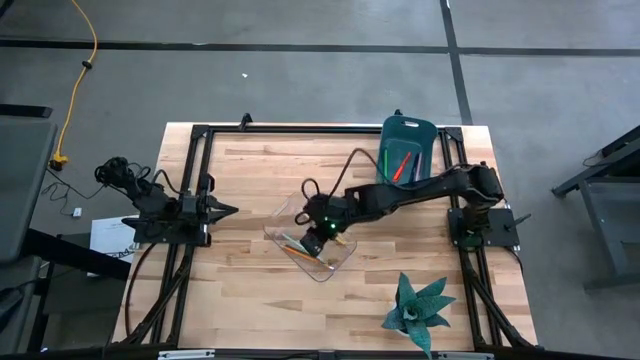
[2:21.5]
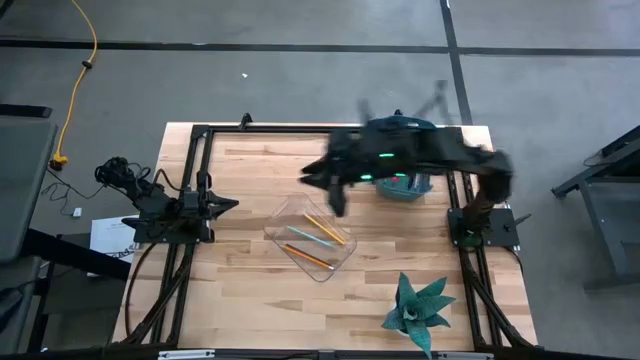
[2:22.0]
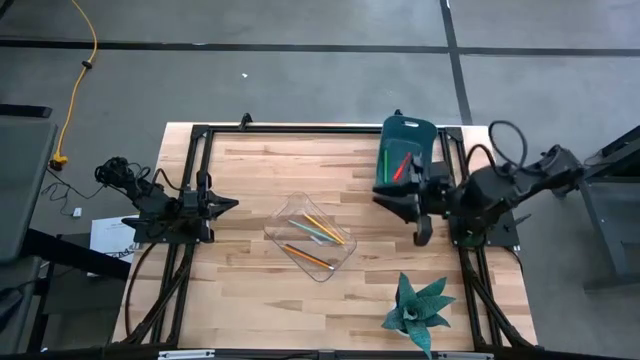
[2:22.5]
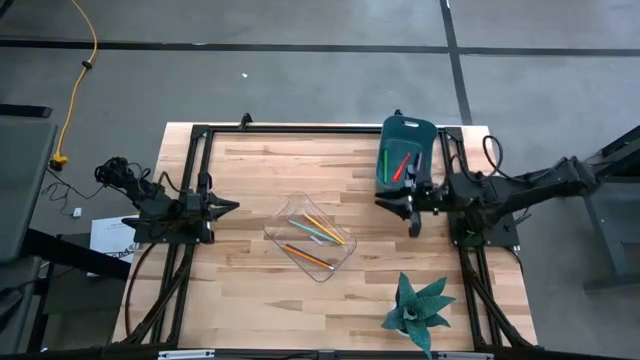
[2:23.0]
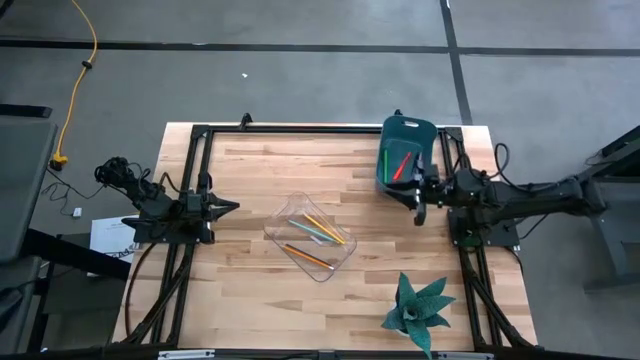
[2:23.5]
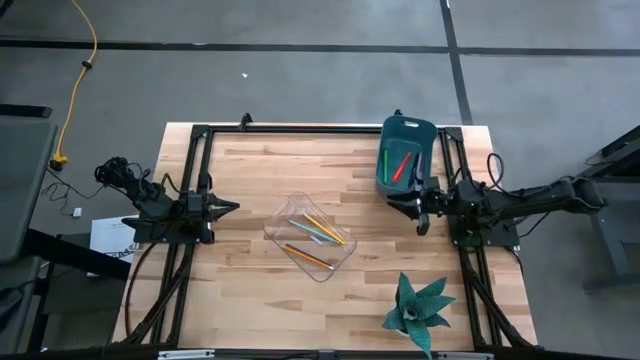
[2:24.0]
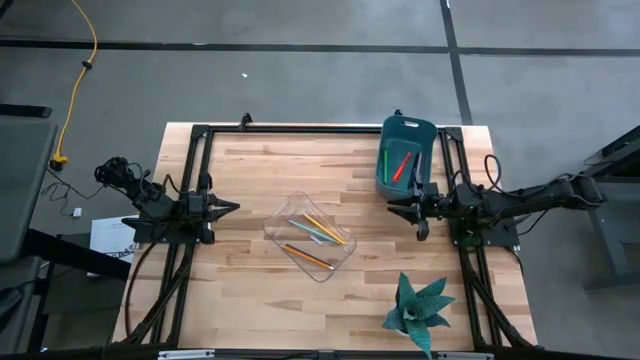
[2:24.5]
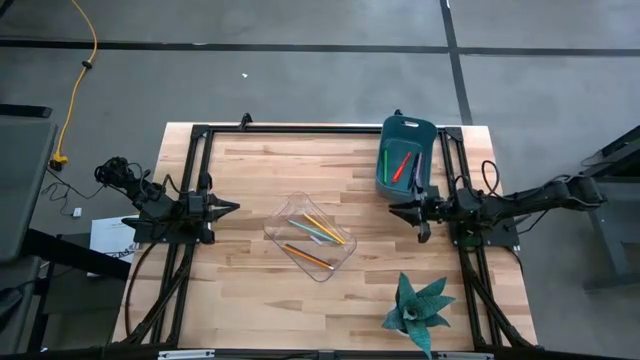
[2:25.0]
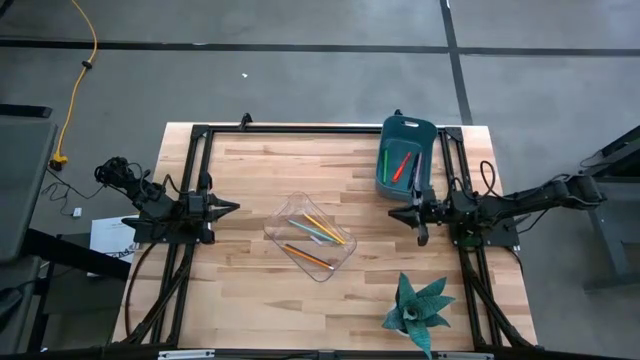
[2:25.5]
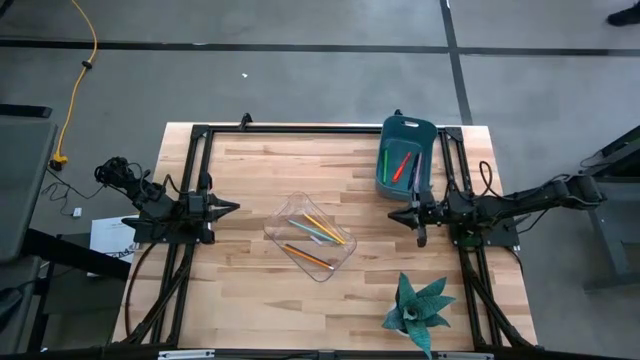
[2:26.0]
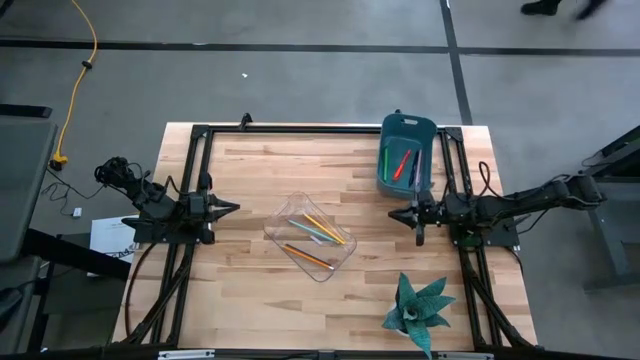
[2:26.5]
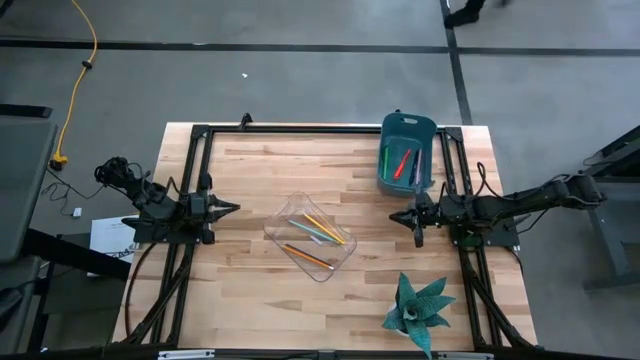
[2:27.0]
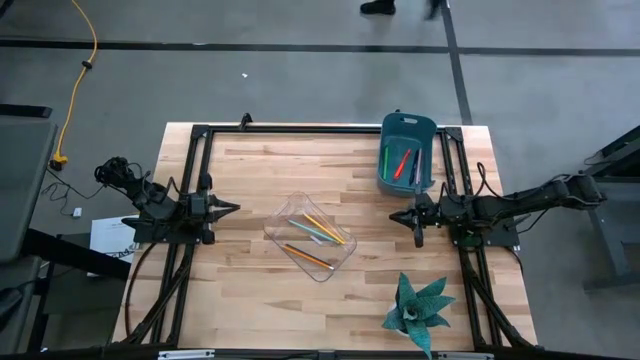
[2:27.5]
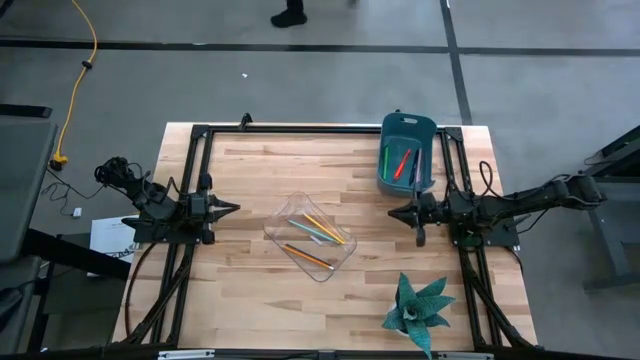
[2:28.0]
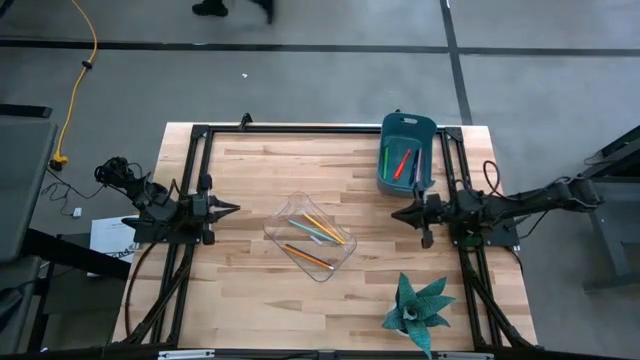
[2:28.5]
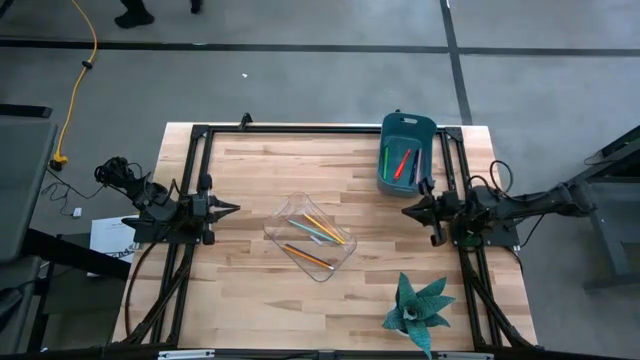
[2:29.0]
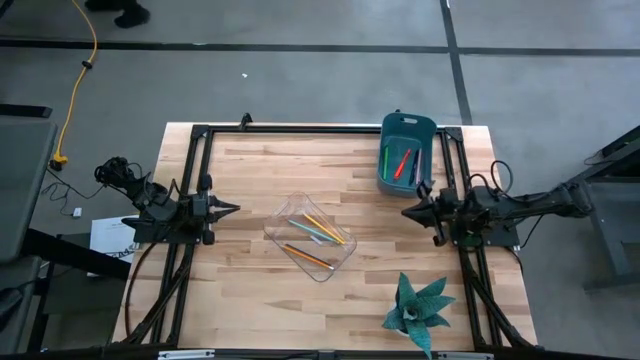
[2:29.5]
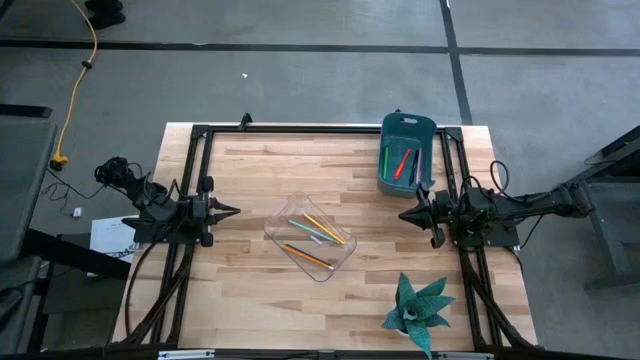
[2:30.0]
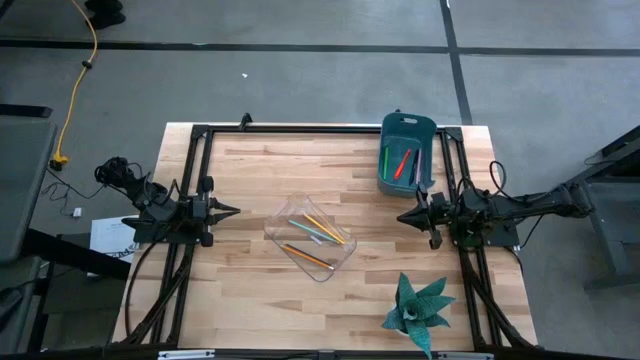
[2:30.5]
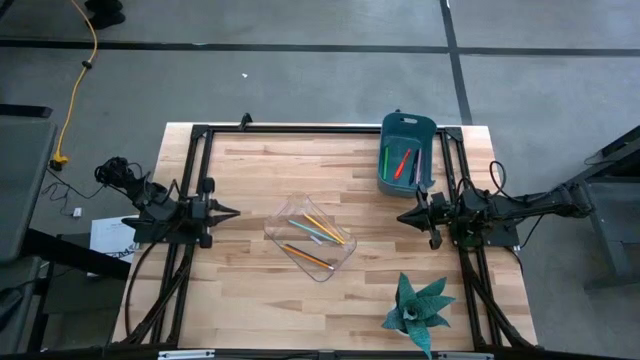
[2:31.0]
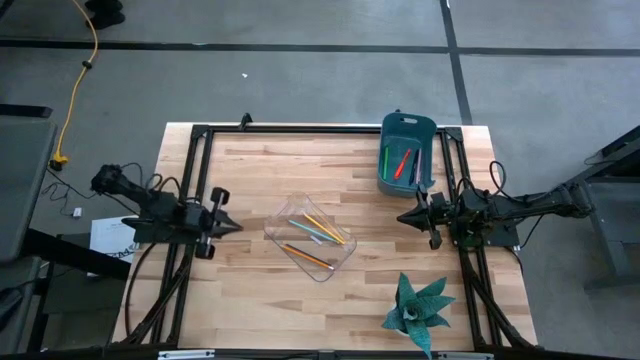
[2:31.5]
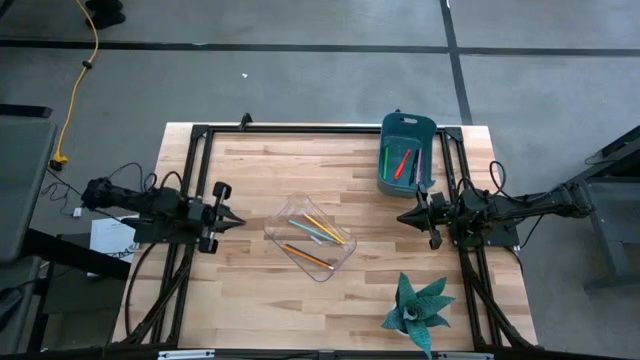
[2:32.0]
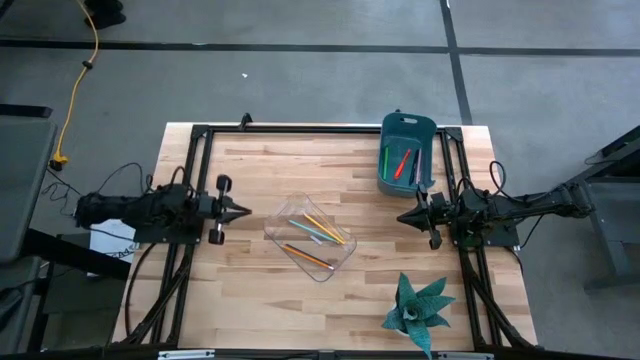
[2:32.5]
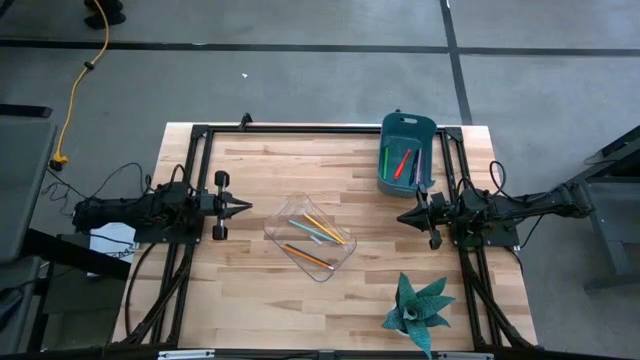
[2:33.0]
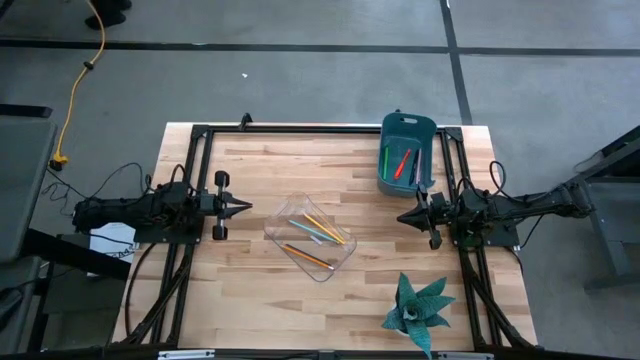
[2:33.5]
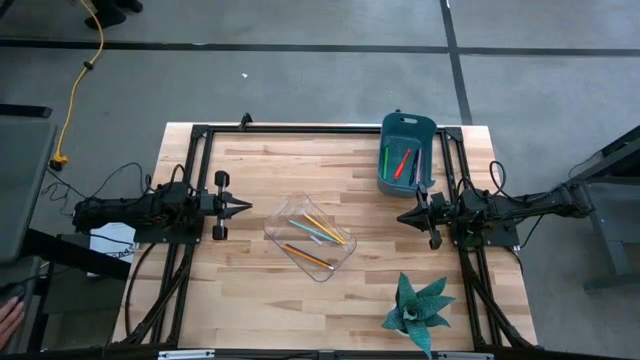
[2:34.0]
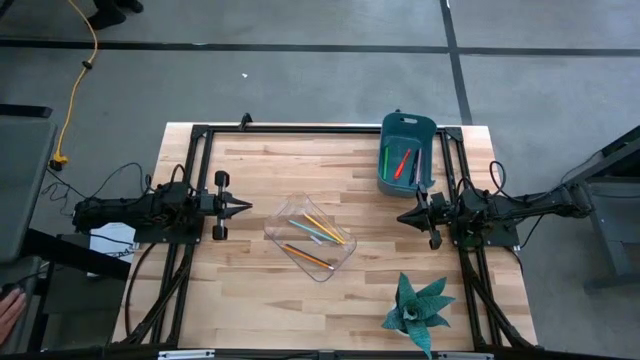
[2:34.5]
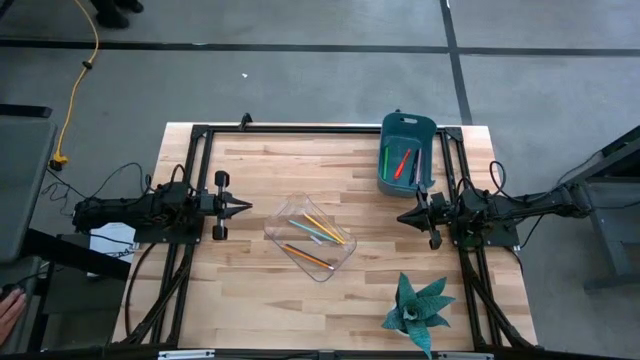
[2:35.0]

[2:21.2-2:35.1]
Task: Sort pens & pencils
Return to Home Position

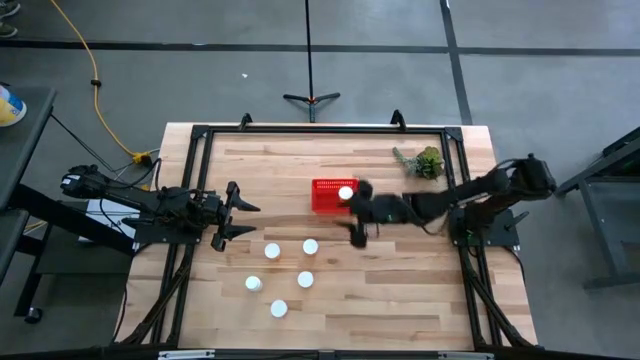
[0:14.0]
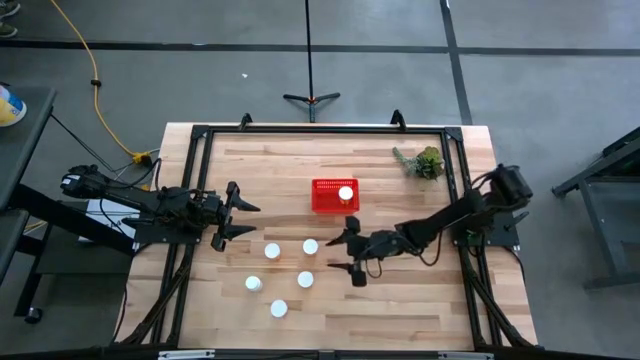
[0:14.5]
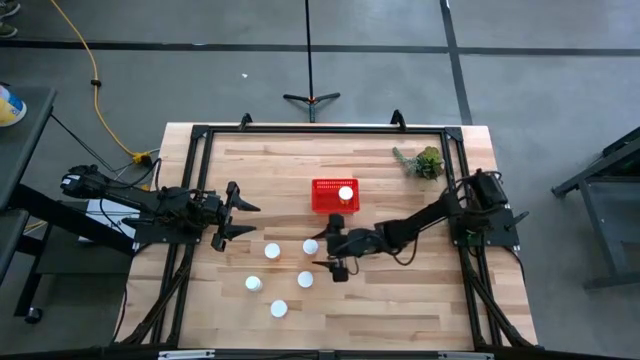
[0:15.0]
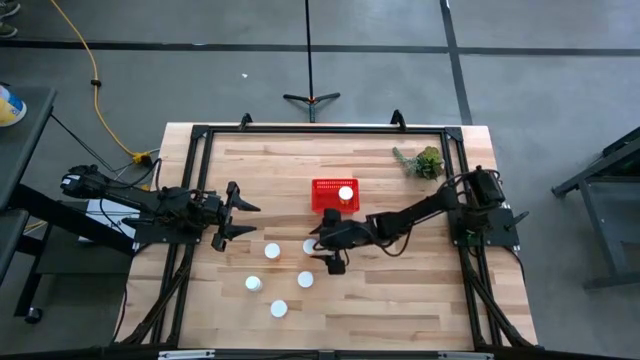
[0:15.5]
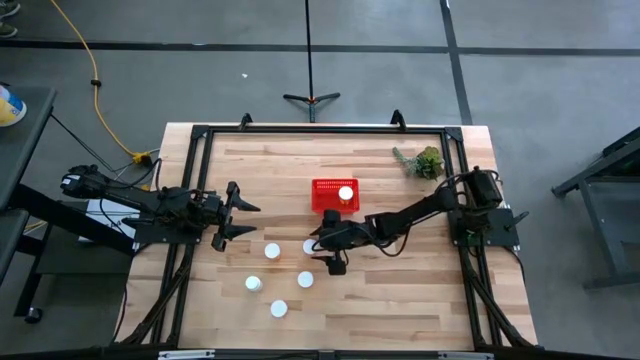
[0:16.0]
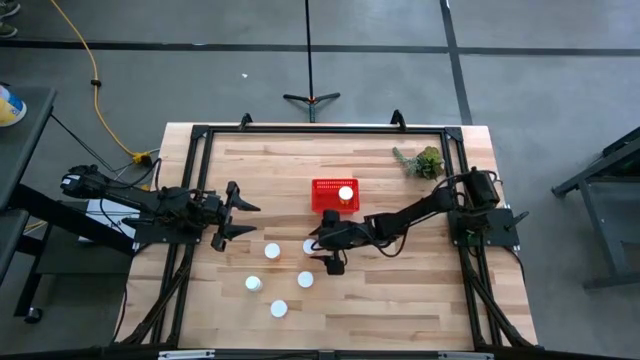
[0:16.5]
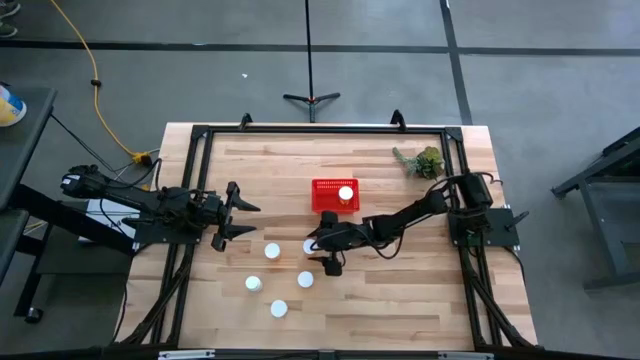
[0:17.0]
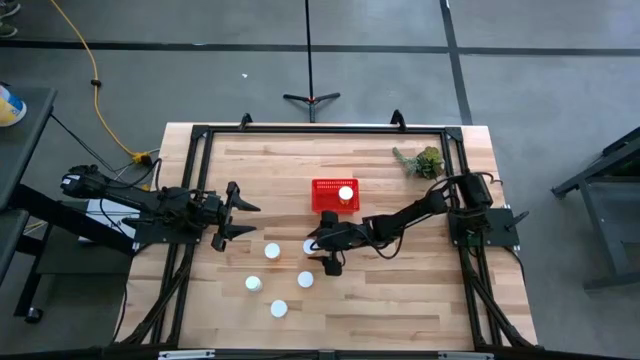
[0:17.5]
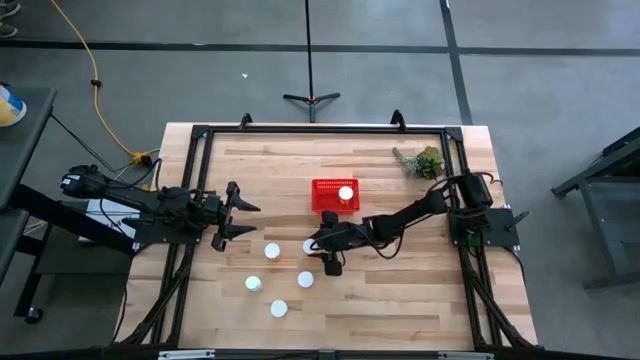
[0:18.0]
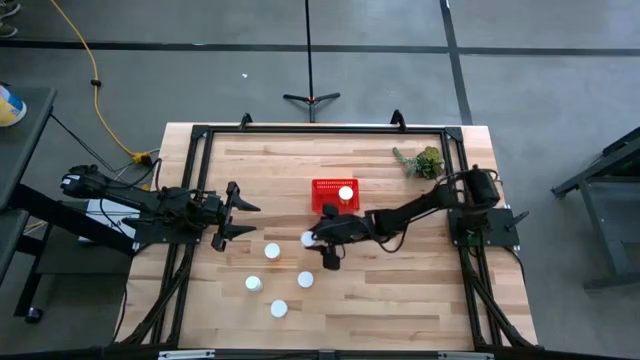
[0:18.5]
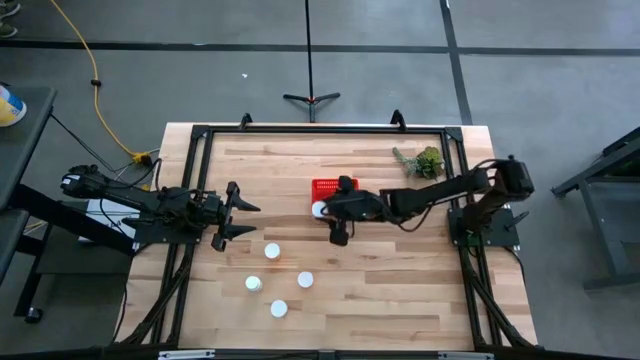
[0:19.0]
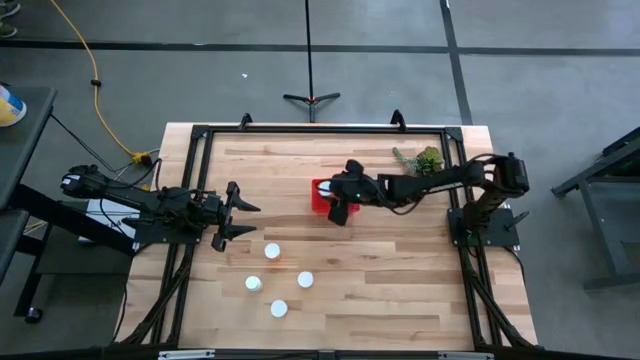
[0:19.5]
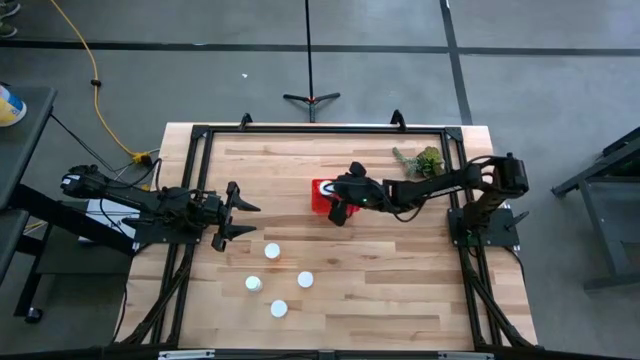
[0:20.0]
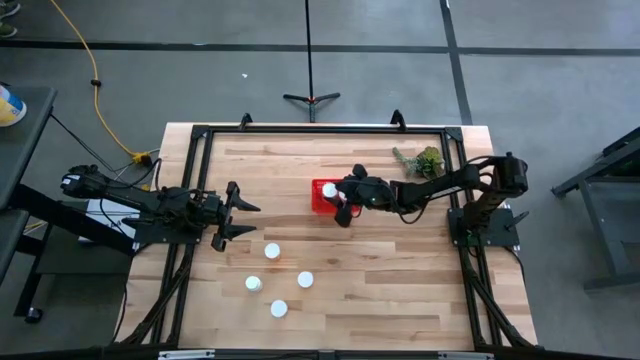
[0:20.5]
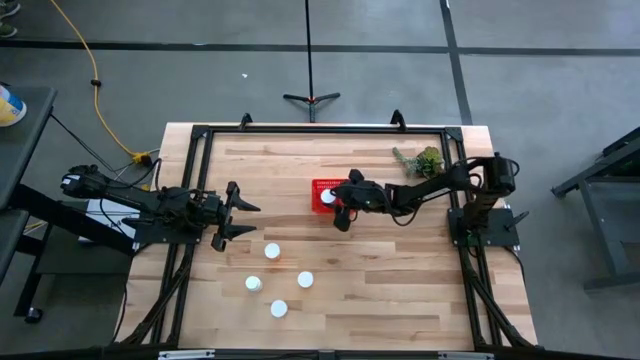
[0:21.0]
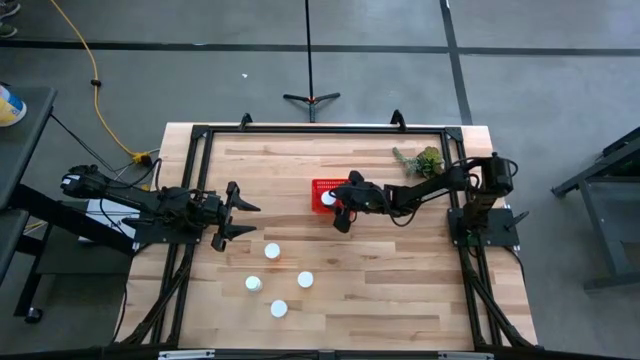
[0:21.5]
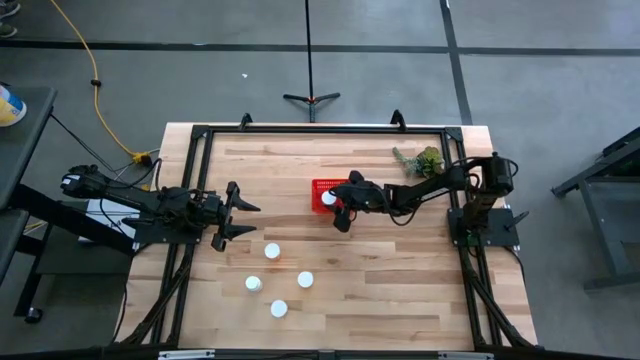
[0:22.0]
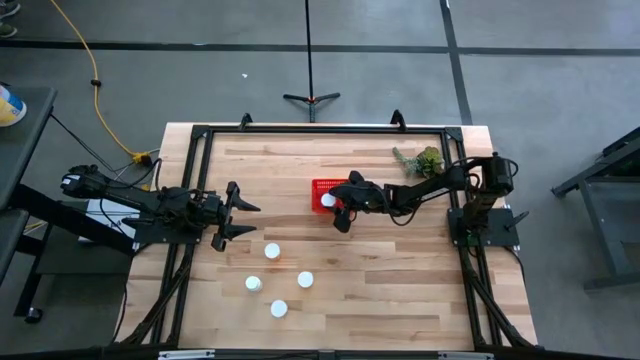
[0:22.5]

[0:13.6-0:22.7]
Task: Pick and place pill bottles into a basket
Put the orange pill bottle into the red bin
